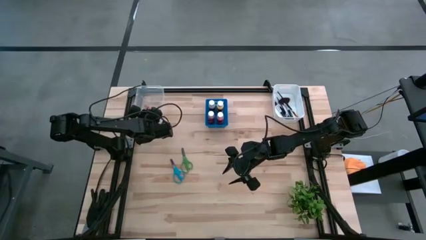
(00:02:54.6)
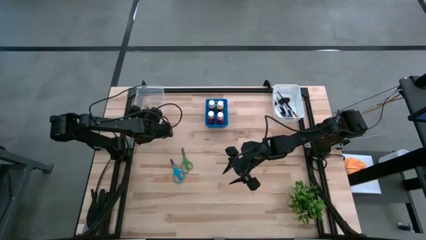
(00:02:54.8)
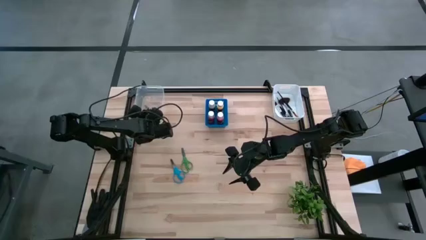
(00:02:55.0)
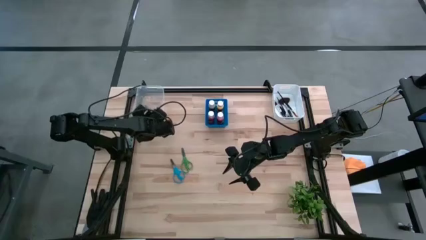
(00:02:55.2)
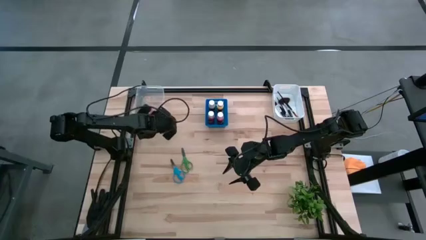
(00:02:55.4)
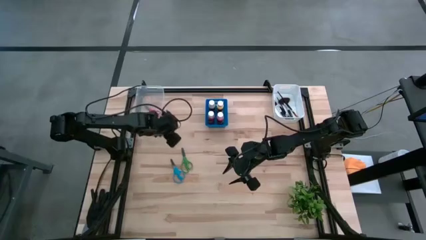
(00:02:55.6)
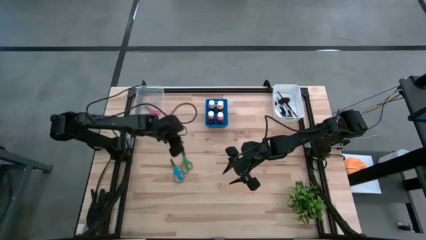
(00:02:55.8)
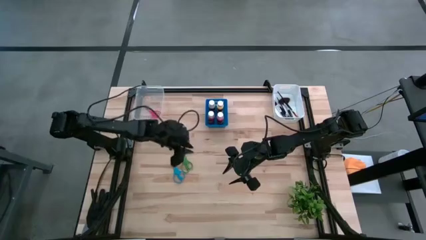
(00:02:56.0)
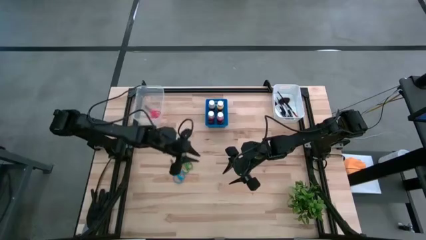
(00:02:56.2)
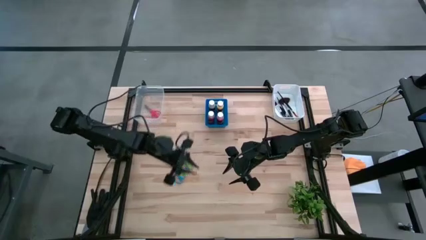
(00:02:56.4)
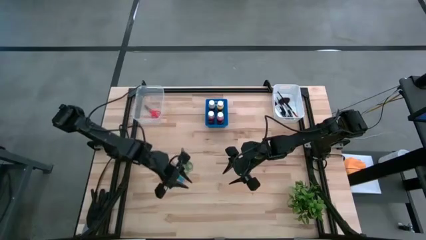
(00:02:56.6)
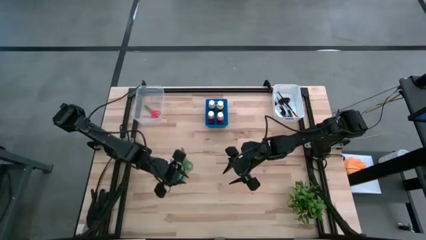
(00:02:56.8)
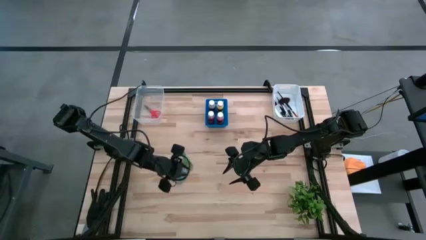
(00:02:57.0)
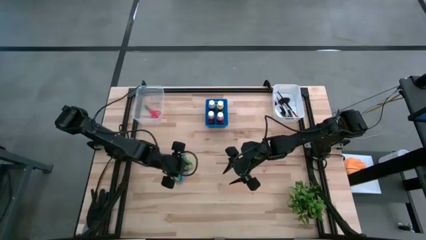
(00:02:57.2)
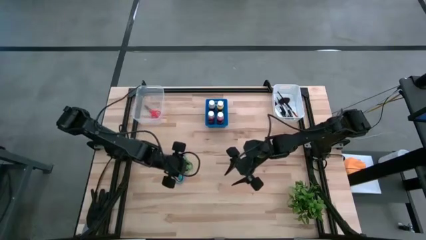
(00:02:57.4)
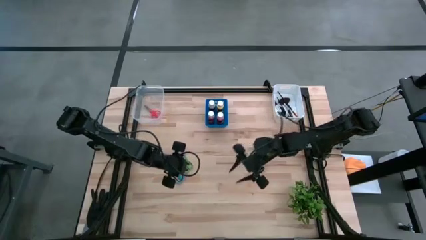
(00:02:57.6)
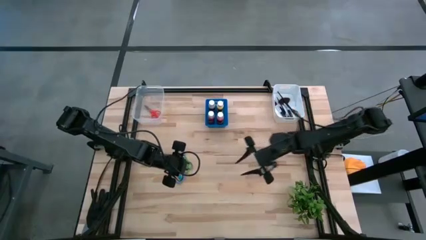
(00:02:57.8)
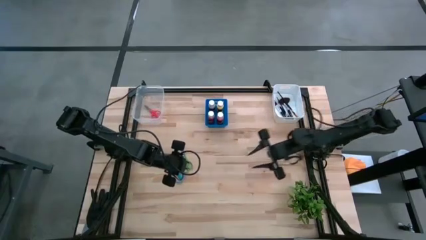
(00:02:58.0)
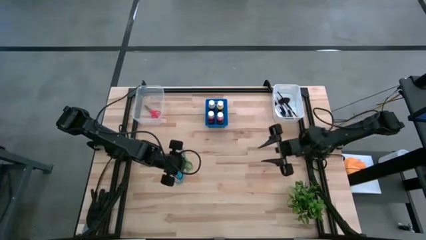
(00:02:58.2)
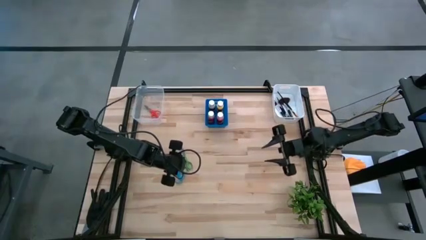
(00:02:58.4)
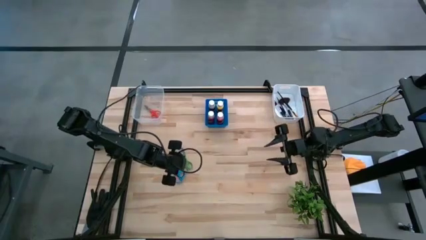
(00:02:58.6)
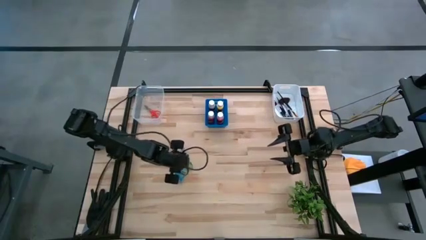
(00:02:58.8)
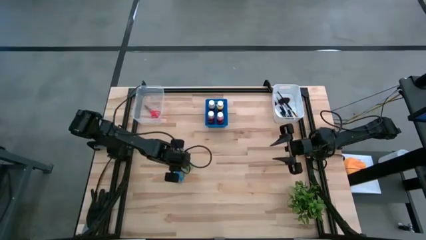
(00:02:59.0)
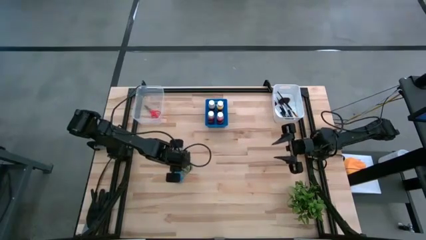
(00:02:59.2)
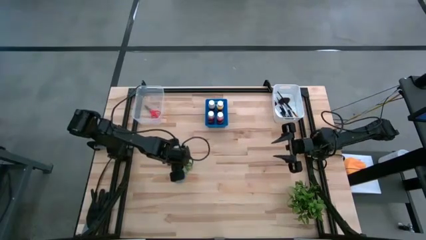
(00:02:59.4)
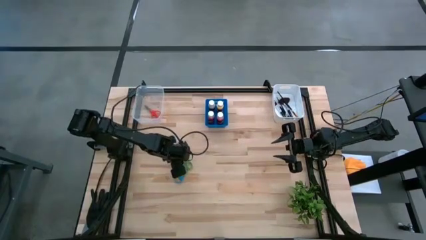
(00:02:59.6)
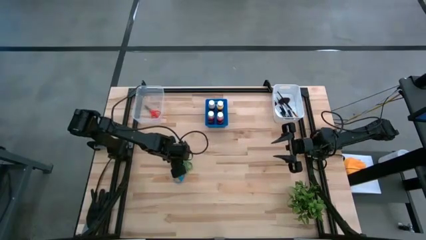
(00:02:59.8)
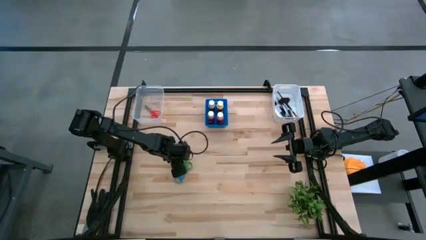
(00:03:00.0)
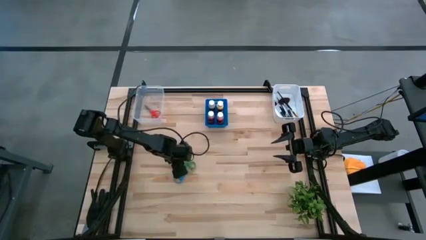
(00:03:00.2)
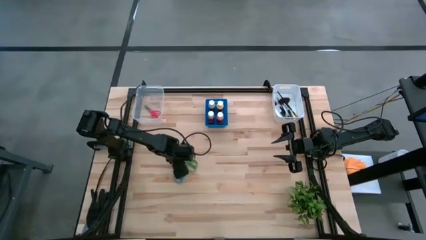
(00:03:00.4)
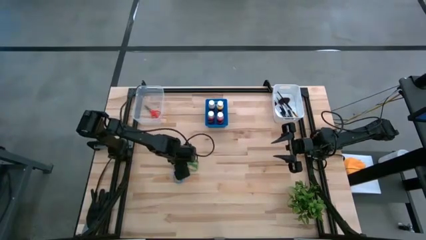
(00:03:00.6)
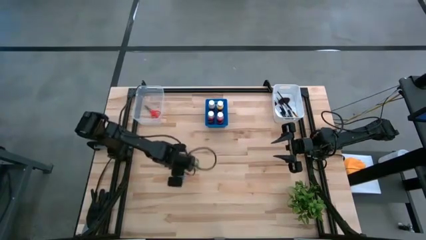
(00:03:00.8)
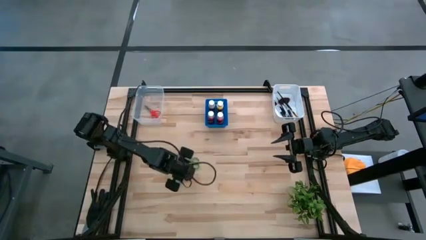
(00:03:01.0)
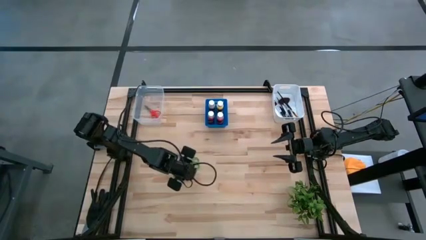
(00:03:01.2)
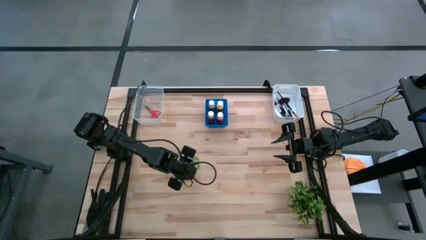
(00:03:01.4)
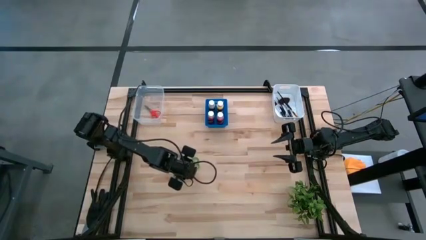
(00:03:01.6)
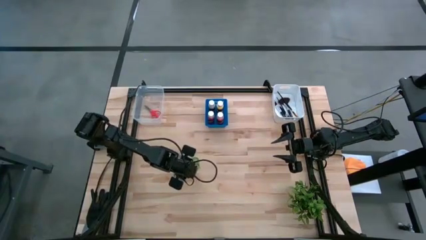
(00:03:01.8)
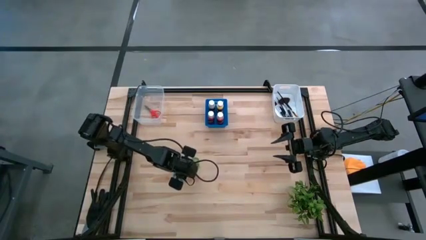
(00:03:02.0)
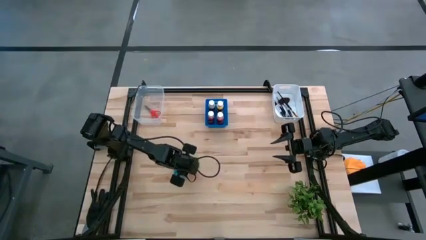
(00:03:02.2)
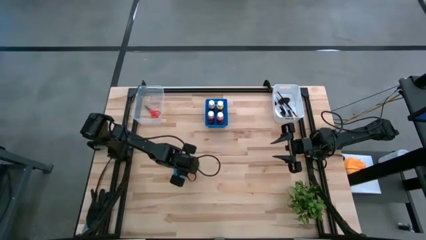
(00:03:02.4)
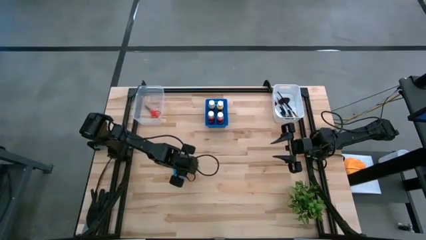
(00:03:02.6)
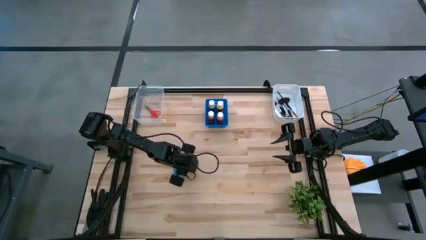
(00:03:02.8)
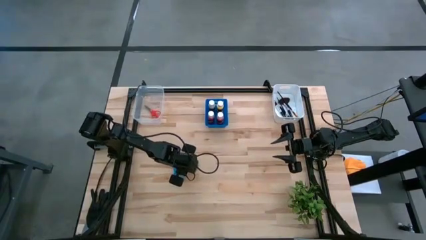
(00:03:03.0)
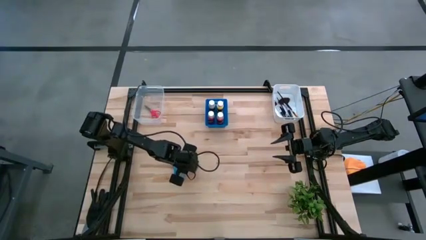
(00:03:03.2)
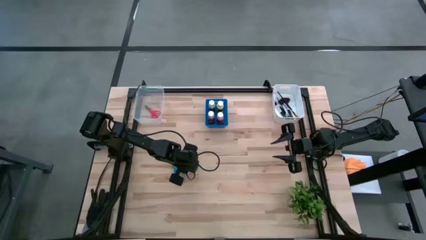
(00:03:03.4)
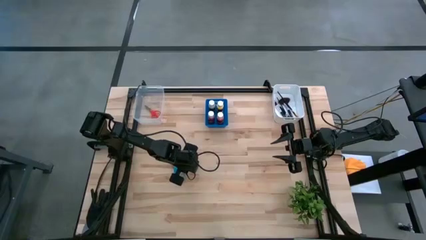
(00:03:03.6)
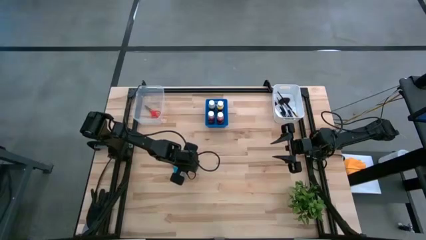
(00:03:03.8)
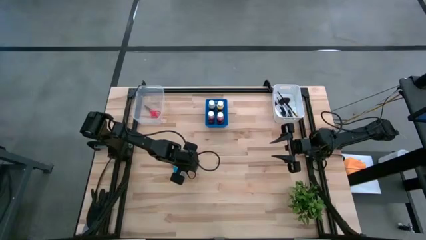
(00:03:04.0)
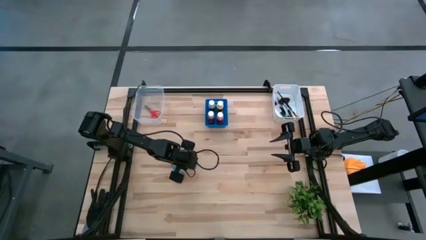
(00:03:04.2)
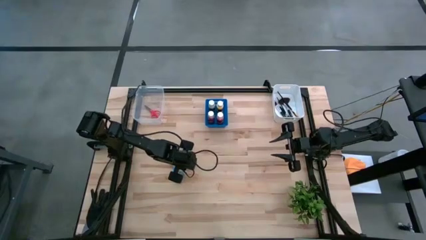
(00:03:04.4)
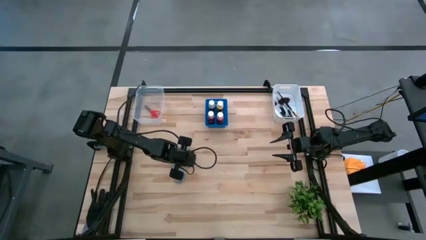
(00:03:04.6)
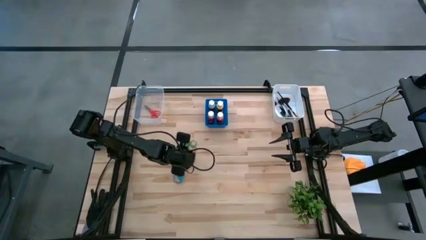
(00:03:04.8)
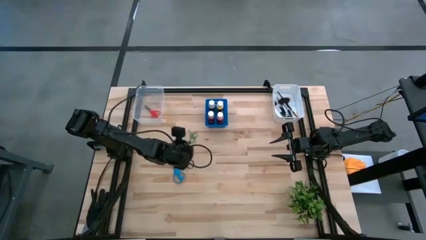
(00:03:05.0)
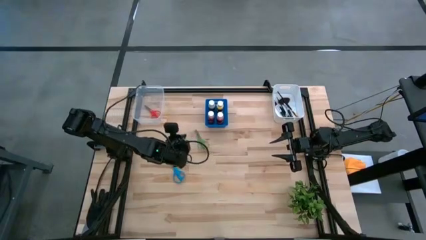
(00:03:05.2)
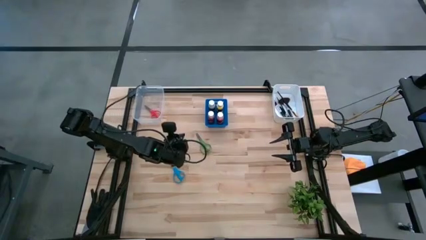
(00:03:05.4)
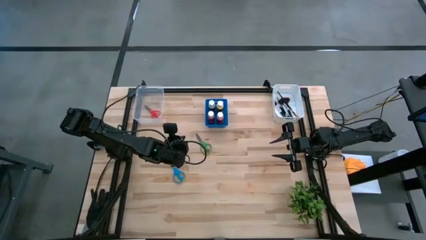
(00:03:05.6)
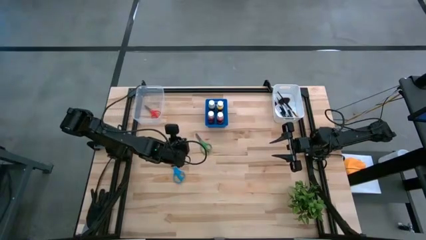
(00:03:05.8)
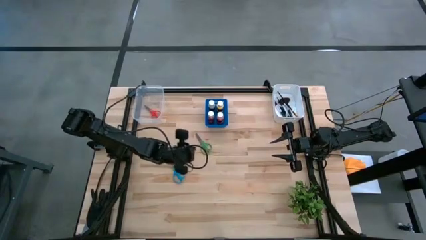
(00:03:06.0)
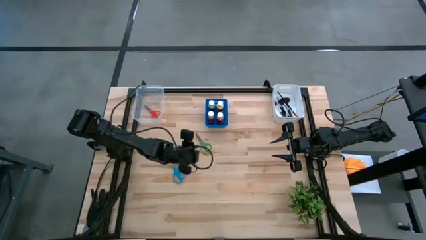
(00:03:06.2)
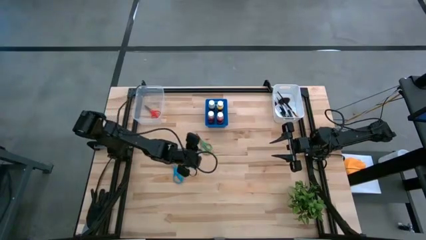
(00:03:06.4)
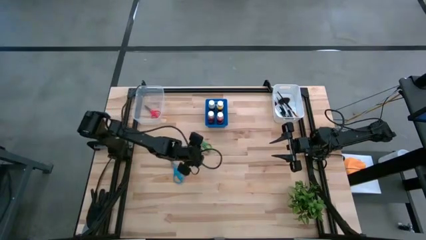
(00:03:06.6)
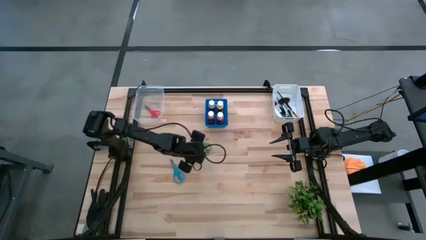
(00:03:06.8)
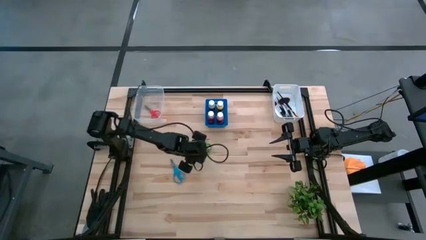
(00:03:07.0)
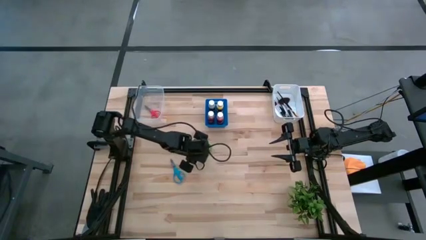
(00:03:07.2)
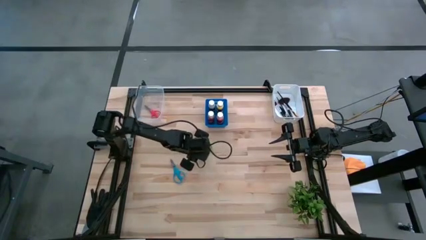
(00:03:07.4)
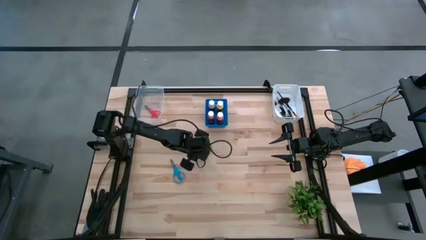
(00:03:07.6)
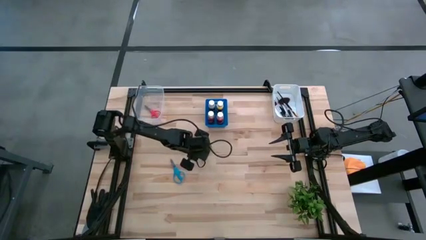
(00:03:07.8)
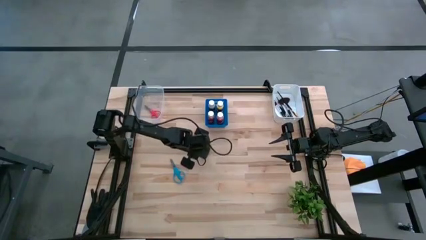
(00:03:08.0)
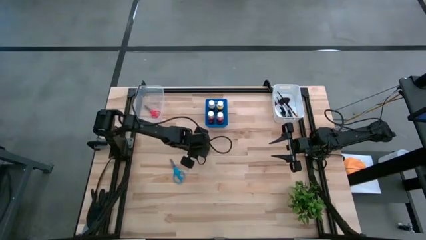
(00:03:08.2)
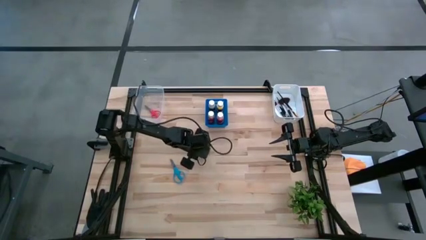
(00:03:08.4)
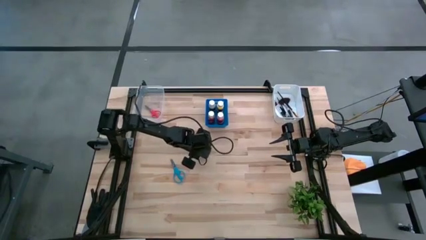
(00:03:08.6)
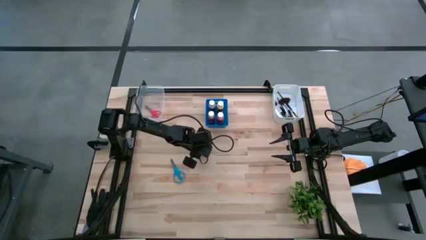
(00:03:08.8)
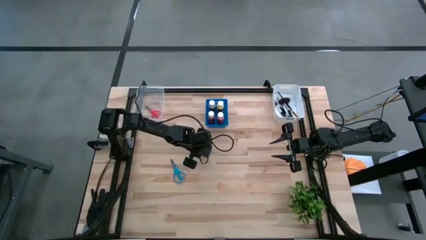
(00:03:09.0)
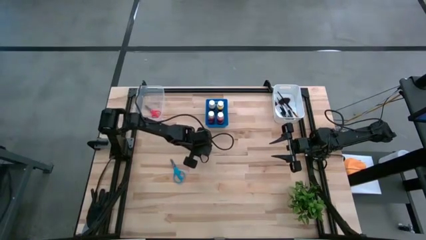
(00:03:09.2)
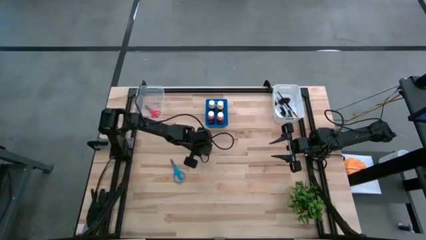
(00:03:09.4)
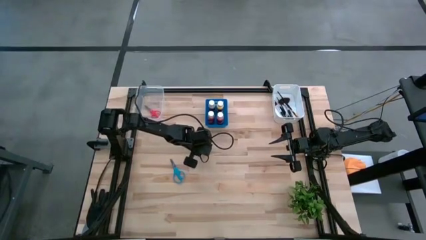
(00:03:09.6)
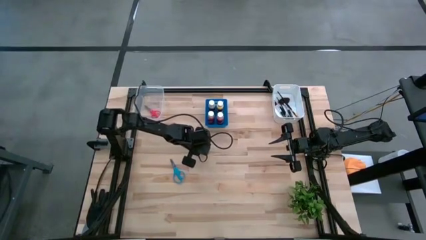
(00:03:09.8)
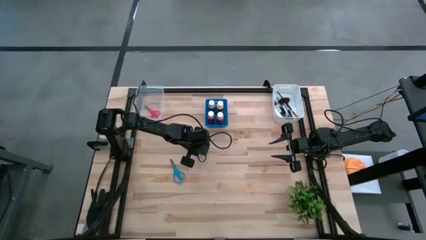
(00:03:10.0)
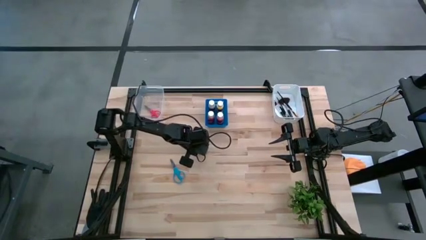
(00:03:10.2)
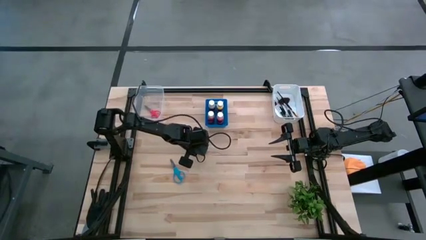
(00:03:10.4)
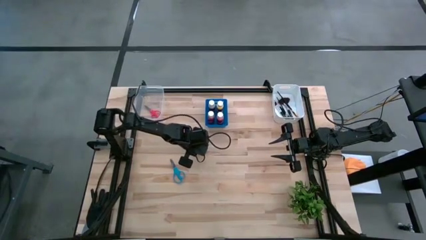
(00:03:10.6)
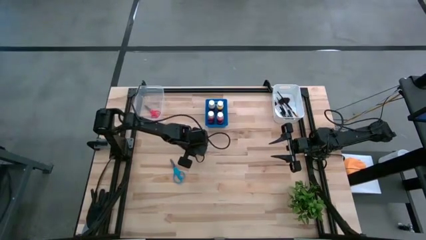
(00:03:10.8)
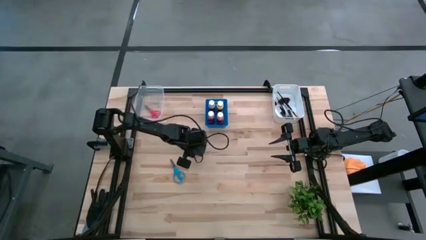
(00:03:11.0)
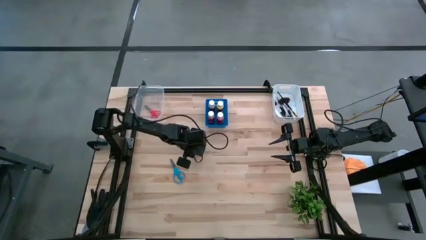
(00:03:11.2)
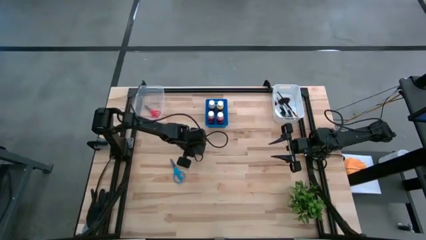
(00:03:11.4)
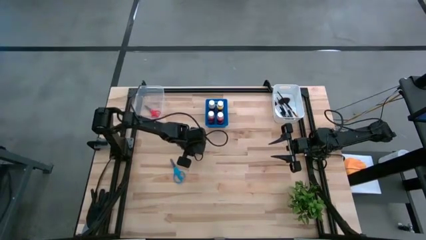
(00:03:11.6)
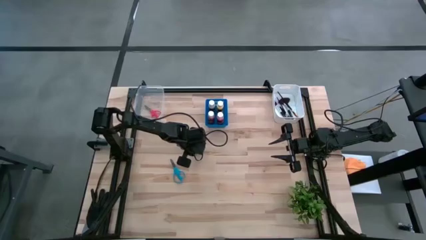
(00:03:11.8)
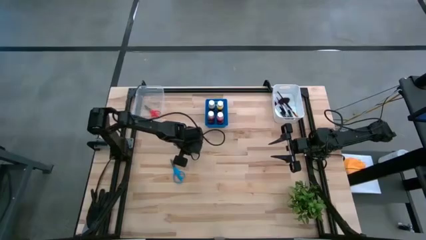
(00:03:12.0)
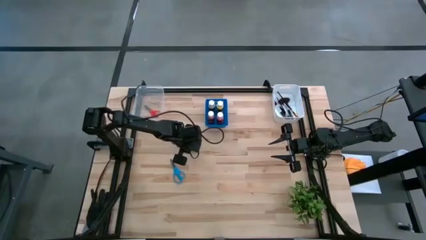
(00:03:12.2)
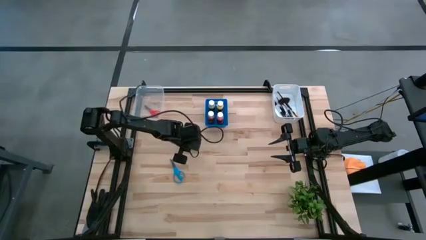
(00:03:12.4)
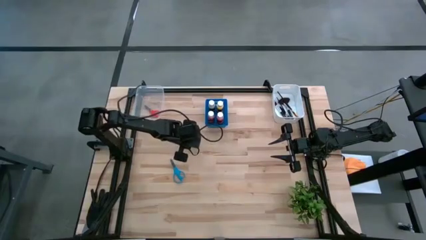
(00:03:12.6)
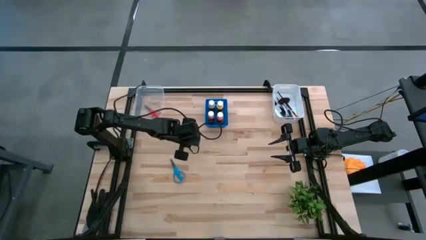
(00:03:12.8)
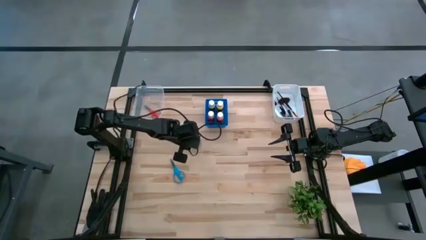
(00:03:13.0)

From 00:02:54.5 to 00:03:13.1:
Task: Pick & Place Paint Supplies
Put the green scissors into the transparent bin
